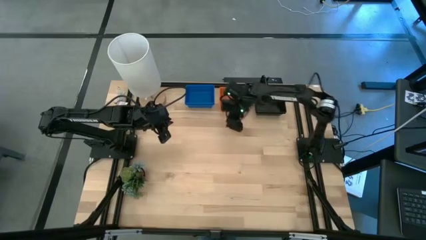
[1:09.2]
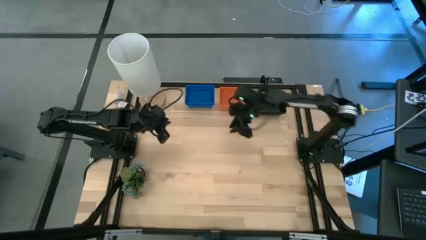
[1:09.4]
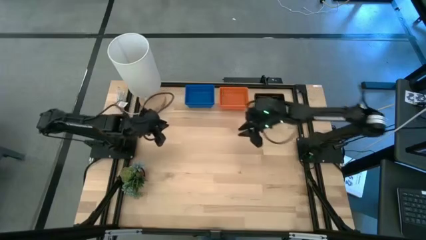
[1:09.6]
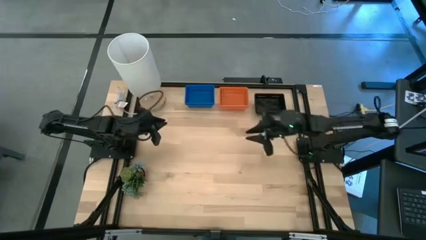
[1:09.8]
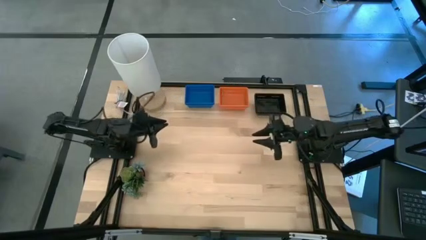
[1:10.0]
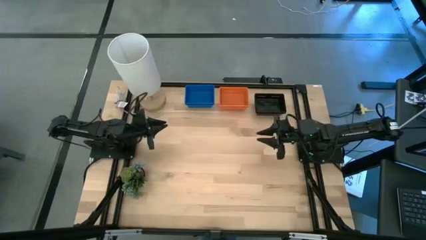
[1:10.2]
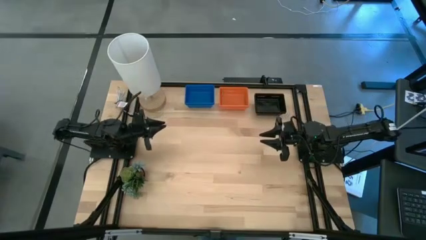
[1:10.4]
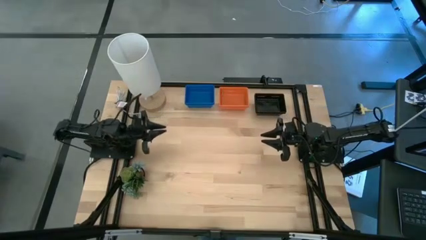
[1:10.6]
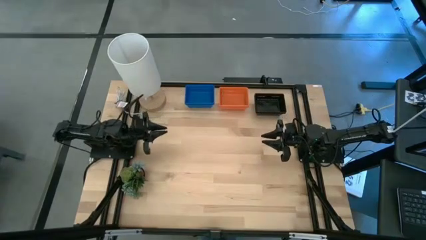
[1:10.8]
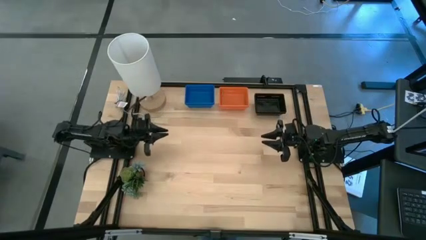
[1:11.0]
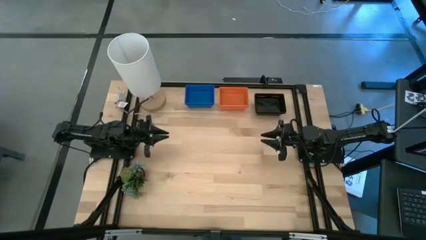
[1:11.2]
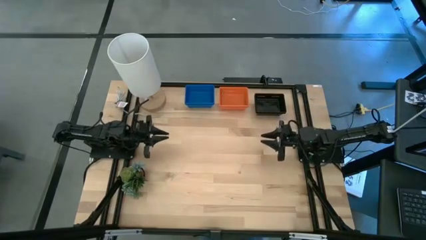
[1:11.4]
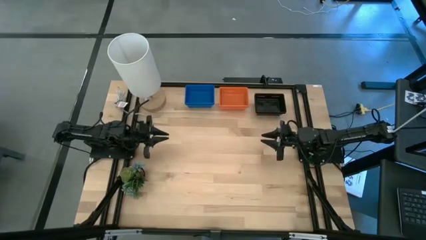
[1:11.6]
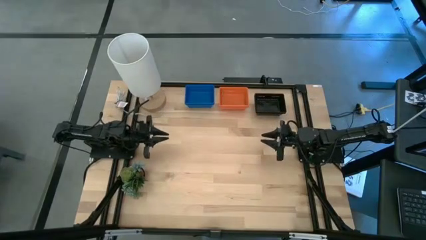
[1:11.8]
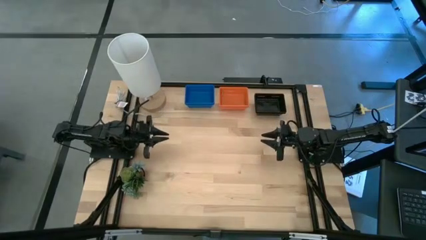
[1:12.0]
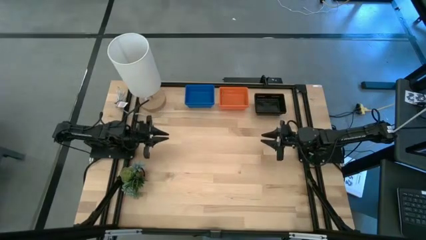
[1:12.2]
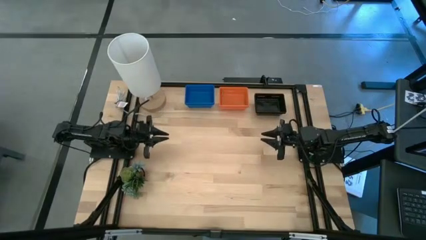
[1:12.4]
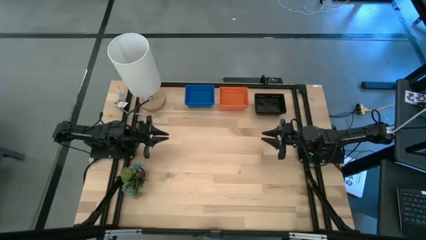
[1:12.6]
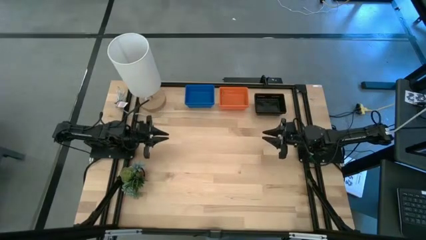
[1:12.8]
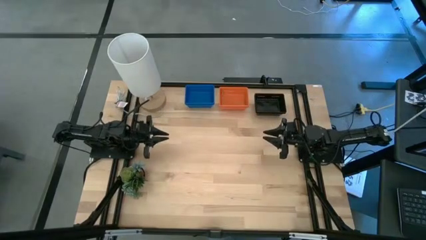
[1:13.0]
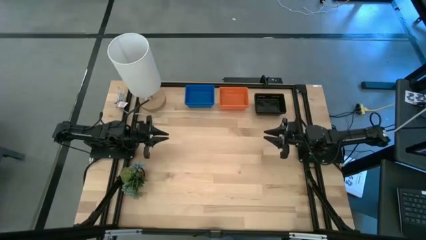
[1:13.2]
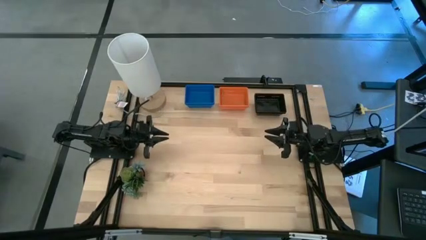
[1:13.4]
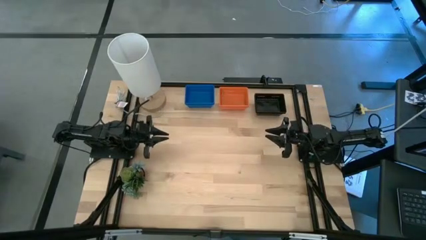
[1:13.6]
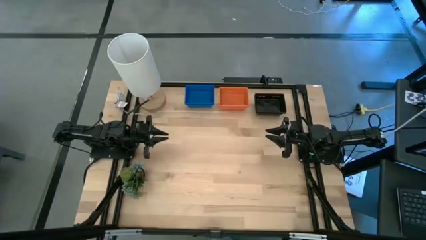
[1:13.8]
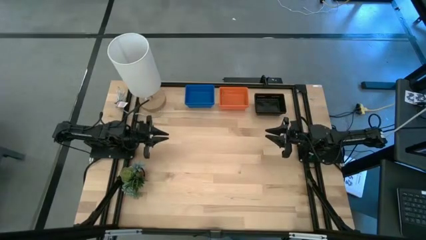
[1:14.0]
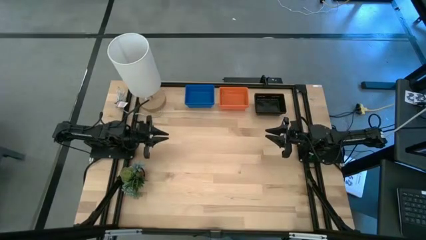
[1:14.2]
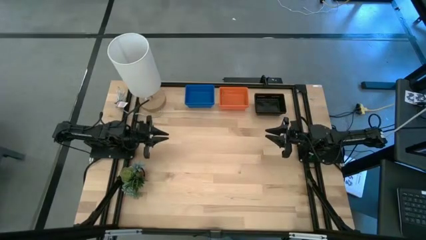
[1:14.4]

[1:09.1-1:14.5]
Return to Home Position

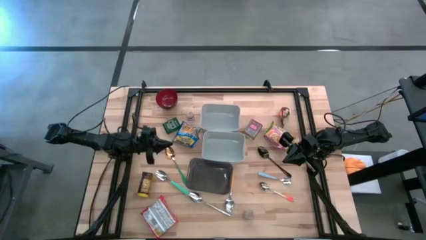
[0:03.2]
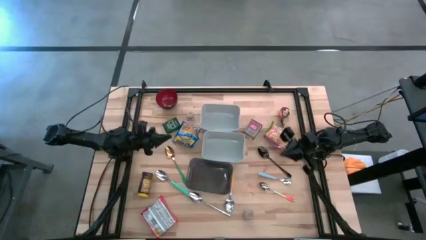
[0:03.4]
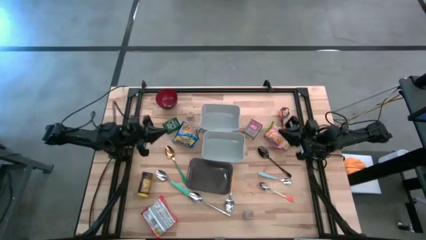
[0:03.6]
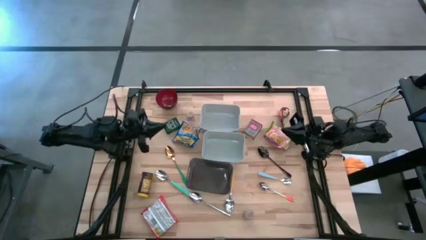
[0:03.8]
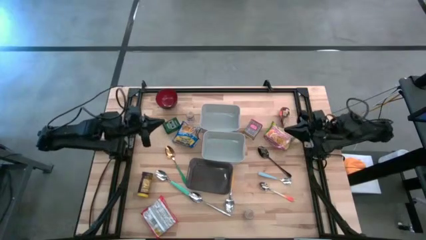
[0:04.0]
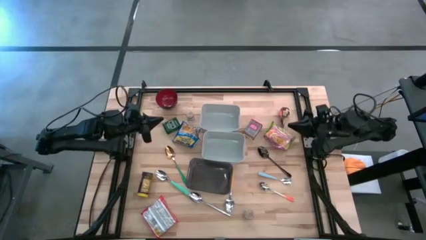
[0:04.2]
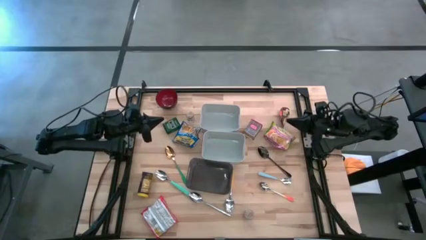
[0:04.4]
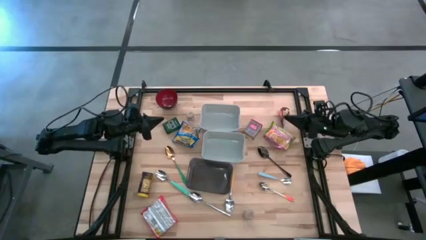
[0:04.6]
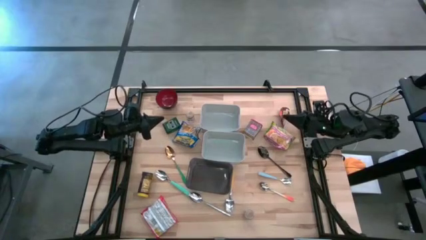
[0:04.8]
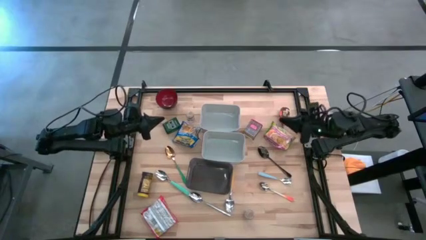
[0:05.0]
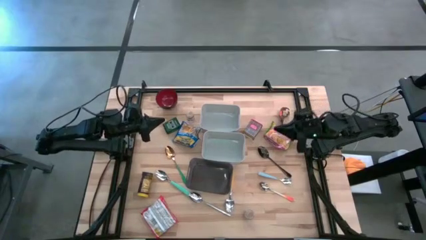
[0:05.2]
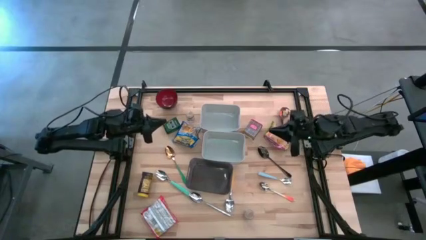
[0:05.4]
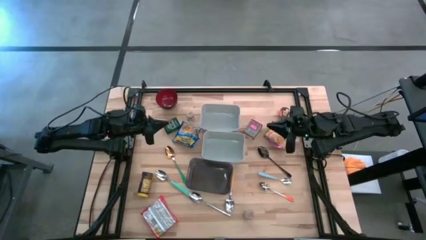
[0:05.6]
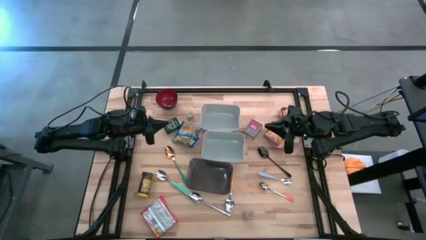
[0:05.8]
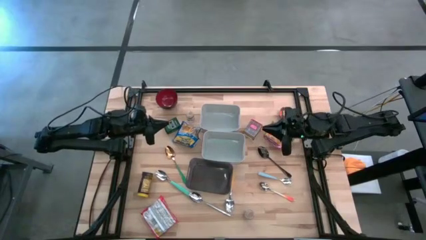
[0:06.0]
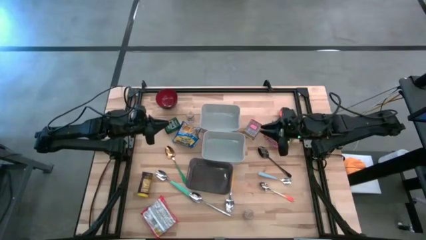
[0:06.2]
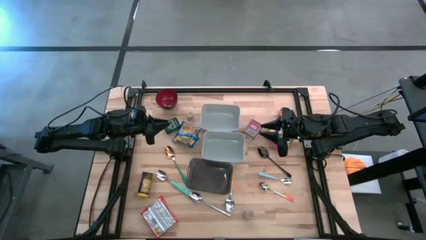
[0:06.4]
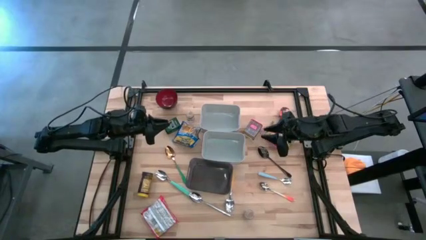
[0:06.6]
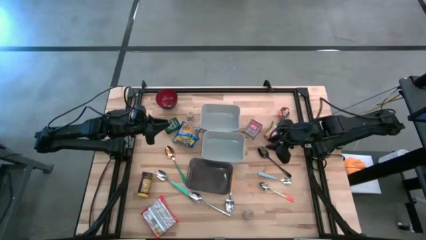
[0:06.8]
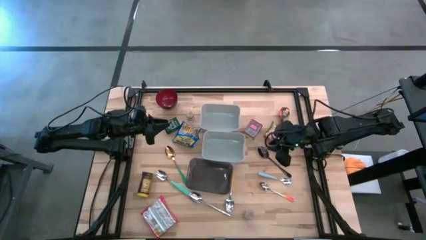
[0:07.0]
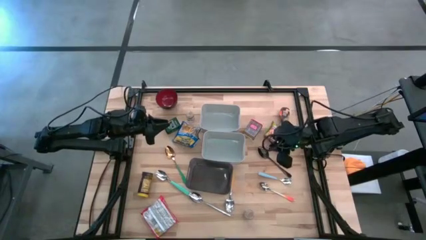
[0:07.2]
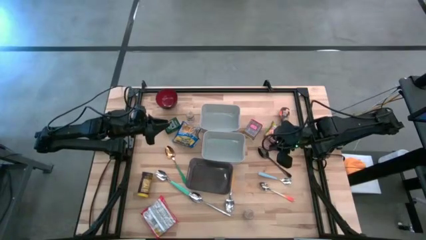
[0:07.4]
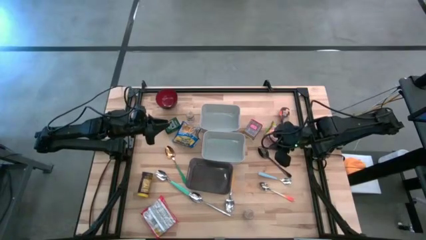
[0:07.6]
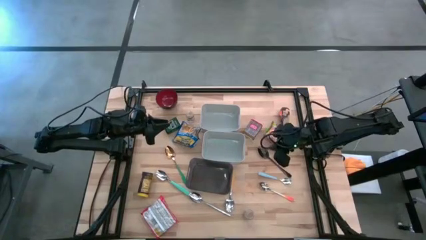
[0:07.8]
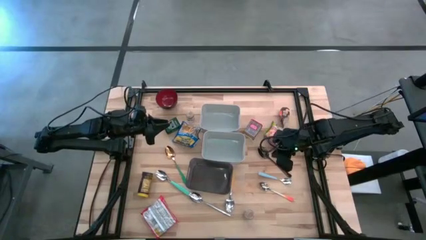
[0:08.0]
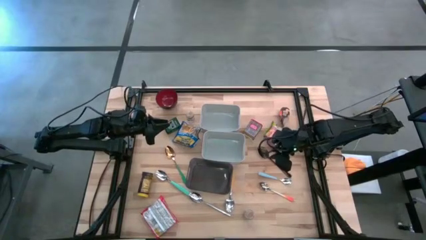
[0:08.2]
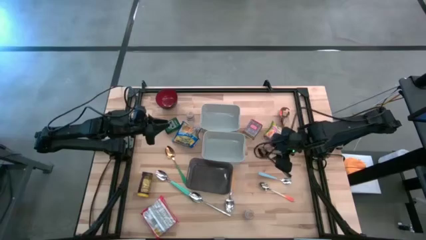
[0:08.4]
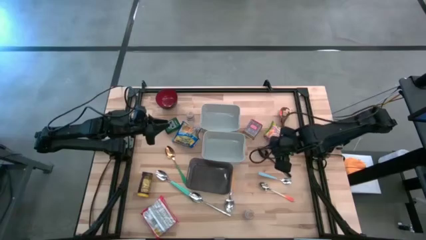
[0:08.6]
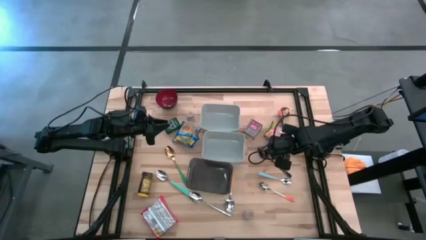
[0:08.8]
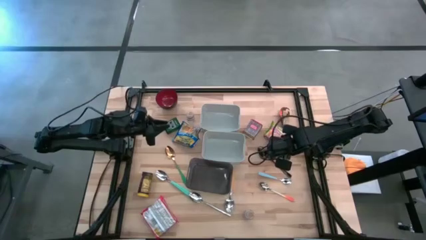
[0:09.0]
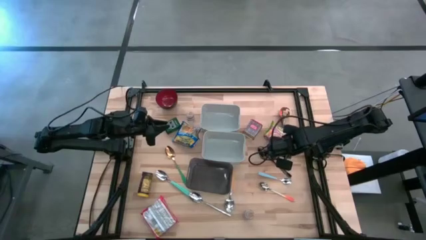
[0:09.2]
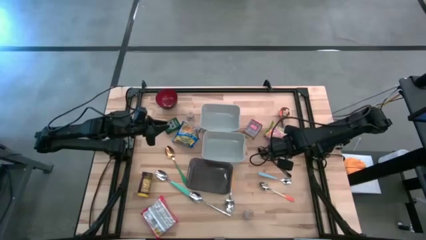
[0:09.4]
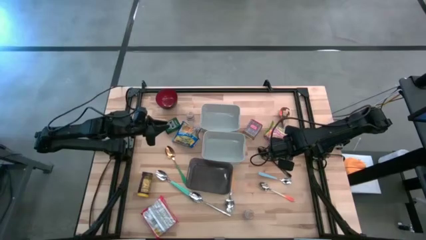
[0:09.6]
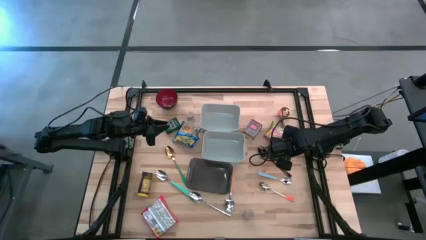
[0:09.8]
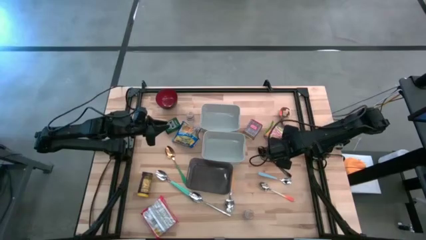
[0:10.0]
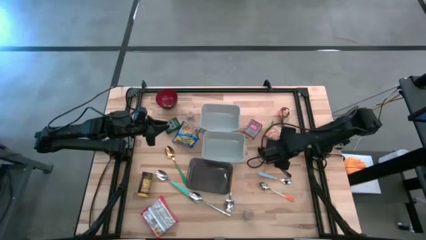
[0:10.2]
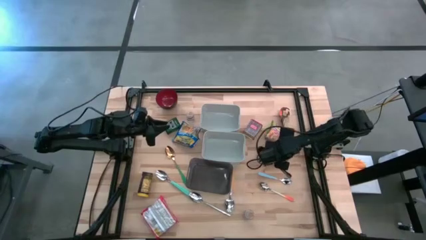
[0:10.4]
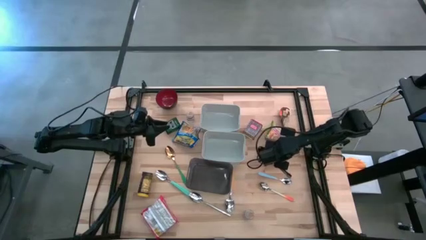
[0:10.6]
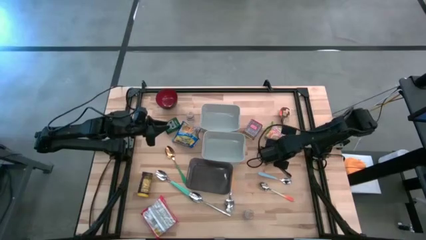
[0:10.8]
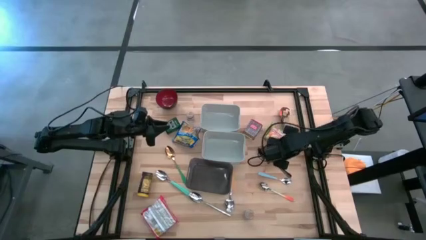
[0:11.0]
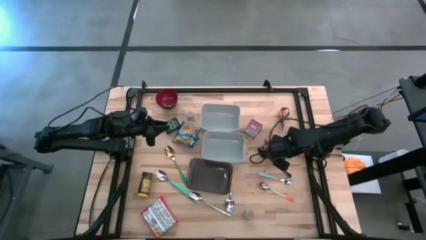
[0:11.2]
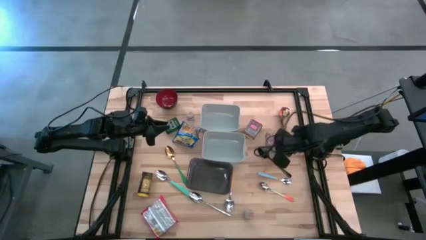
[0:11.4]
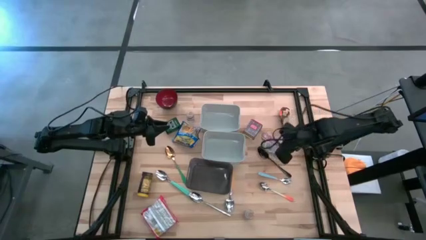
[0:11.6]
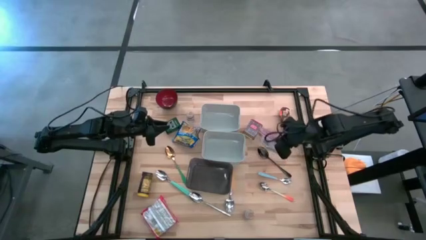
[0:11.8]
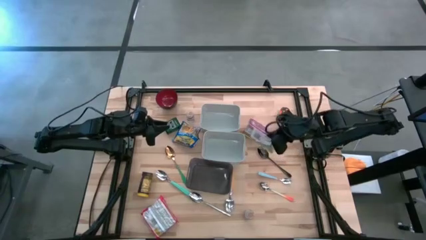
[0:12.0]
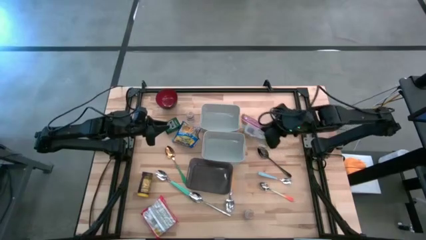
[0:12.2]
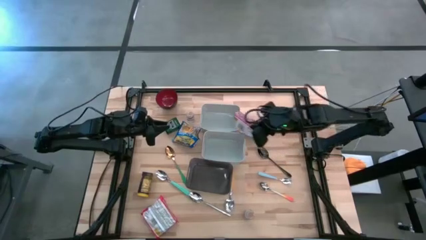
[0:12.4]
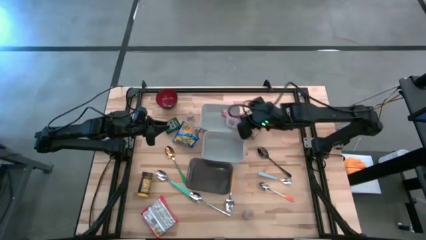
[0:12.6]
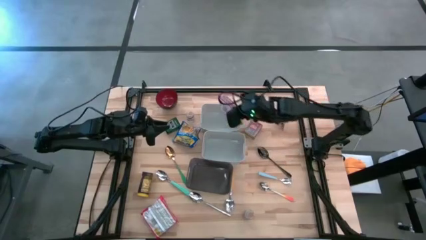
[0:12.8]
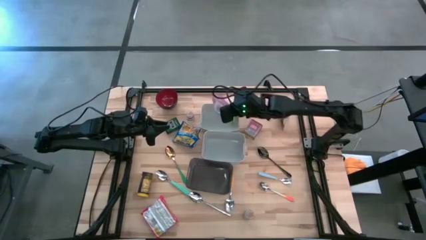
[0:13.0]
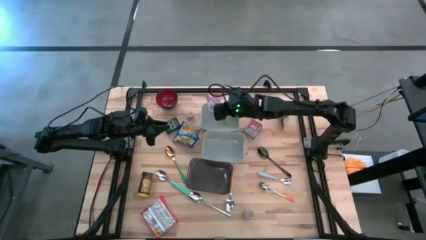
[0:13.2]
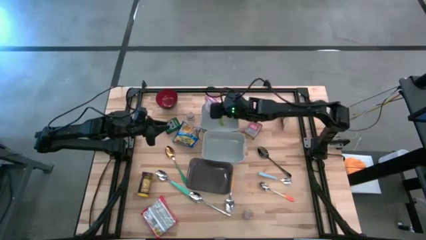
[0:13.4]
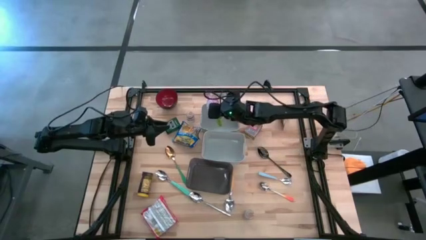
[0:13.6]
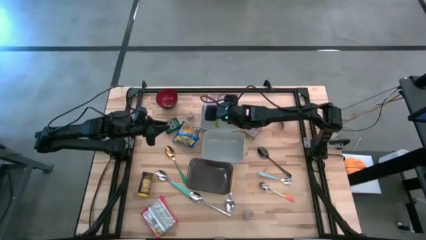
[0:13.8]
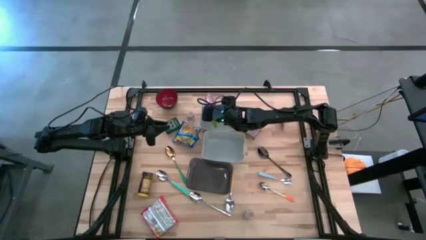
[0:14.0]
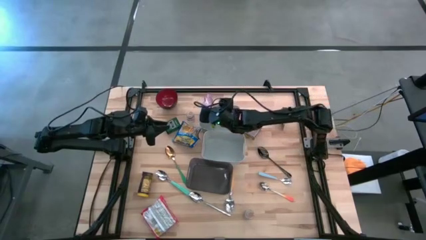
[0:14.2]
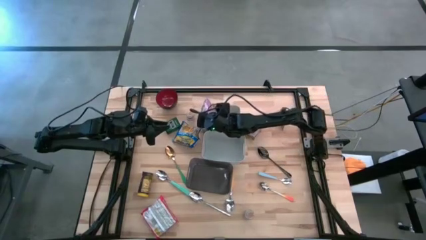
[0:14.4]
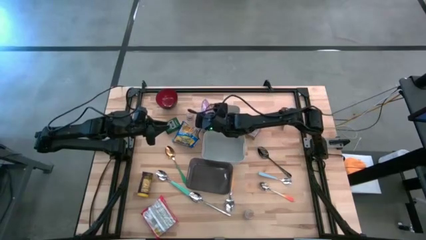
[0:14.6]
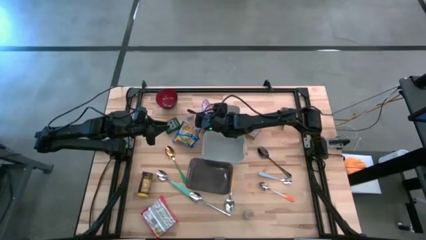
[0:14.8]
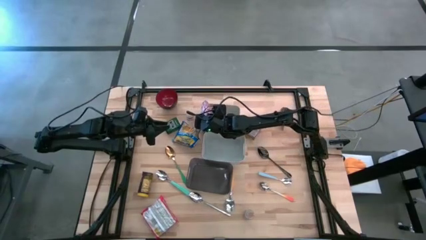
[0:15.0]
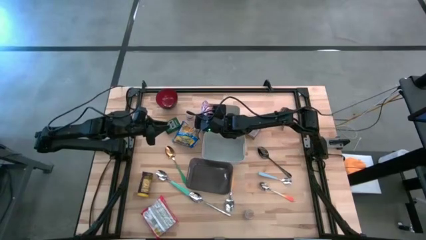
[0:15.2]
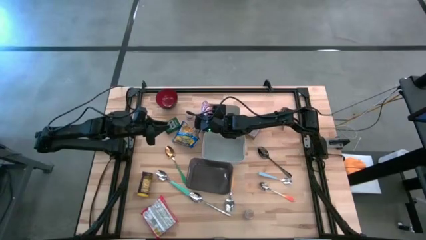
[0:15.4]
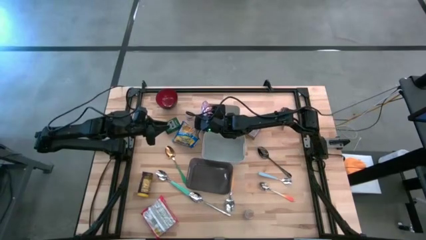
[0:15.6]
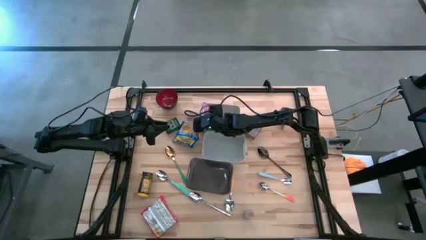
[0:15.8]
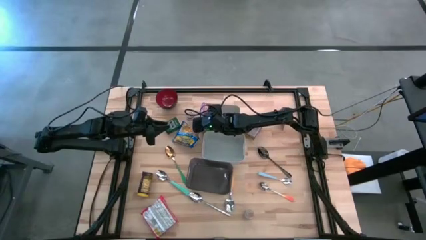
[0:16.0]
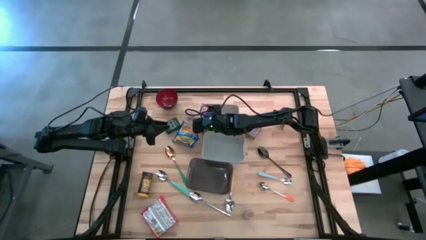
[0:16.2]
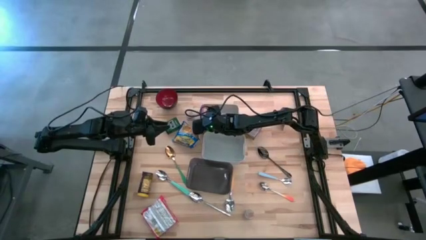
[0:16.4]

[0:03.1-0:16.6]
Put the green noodle pack into the top gray bin
